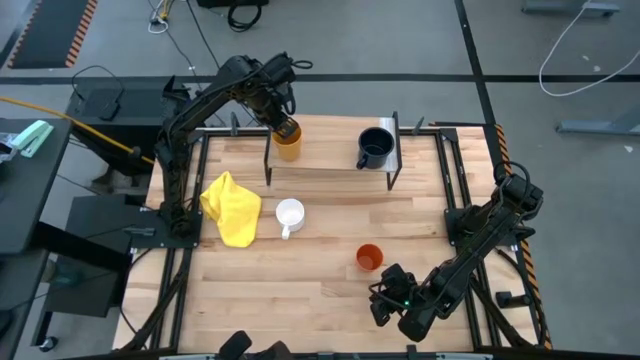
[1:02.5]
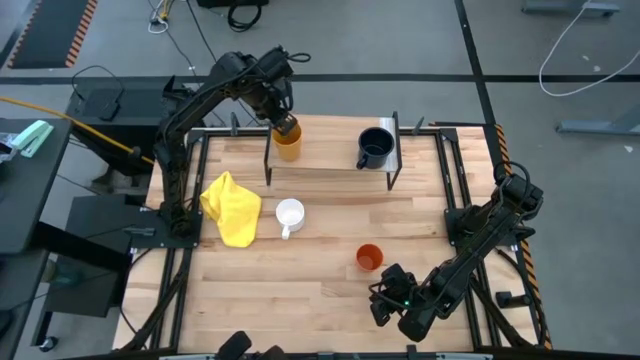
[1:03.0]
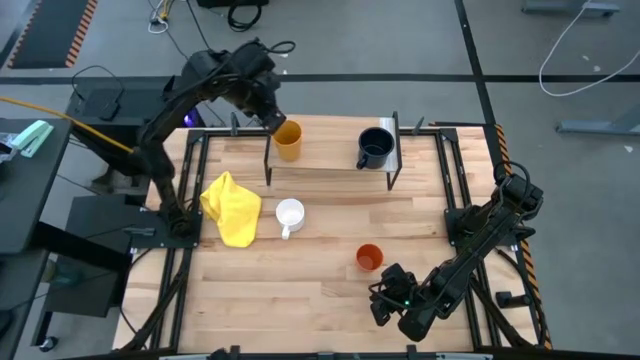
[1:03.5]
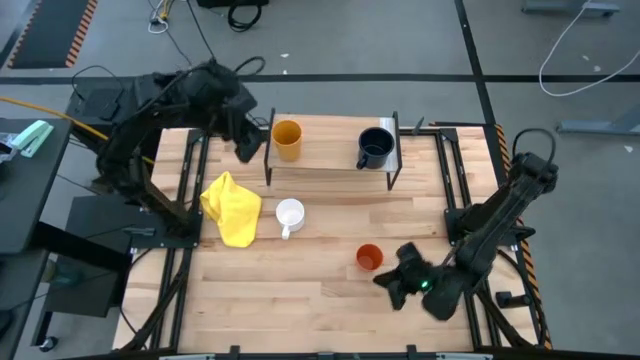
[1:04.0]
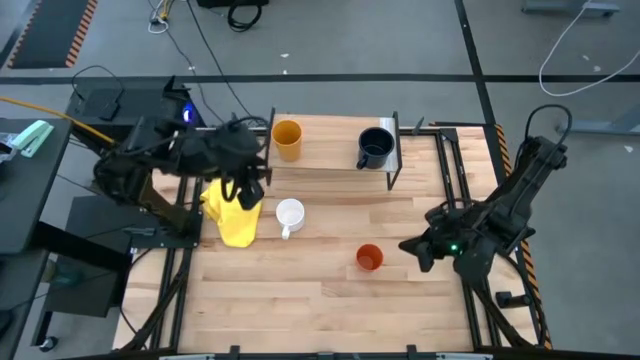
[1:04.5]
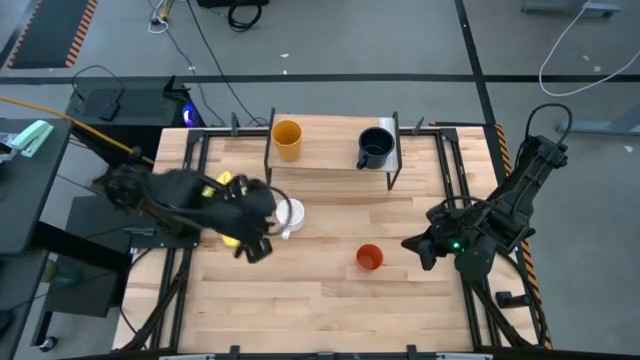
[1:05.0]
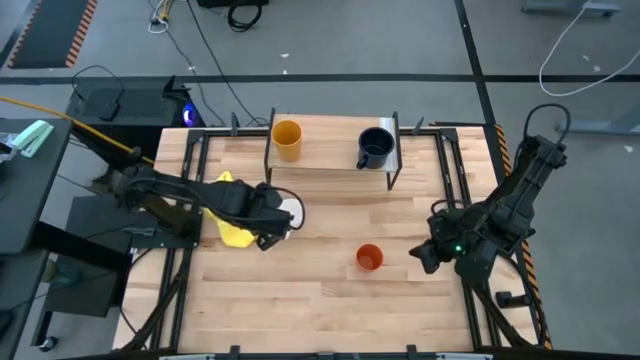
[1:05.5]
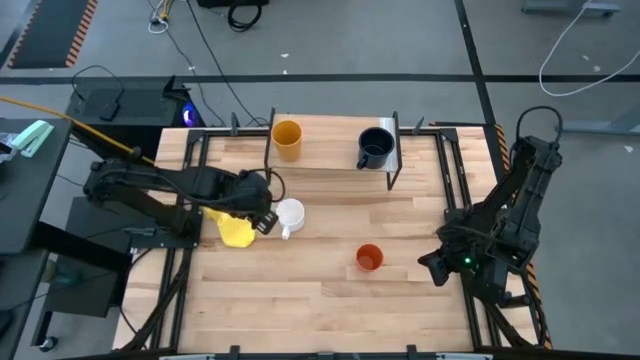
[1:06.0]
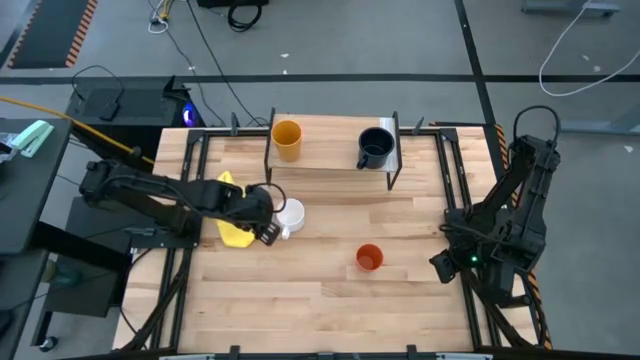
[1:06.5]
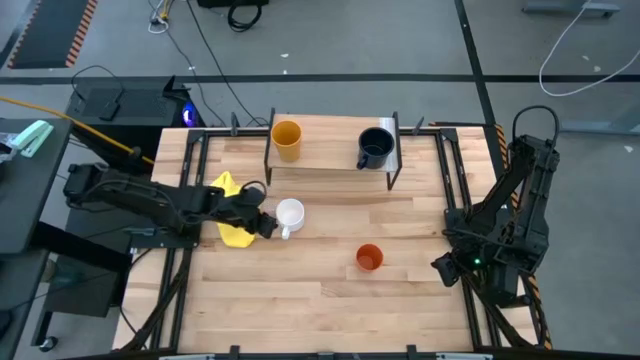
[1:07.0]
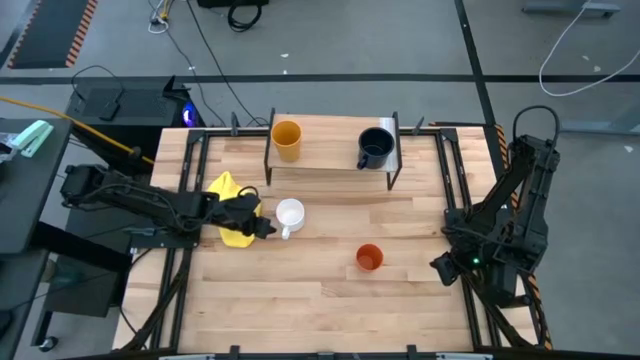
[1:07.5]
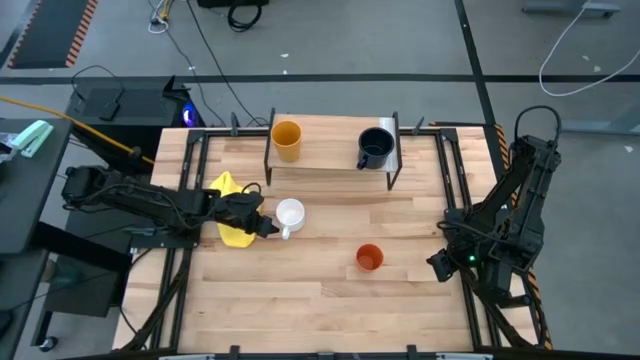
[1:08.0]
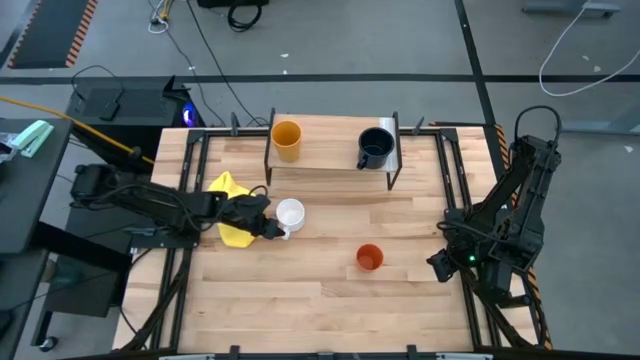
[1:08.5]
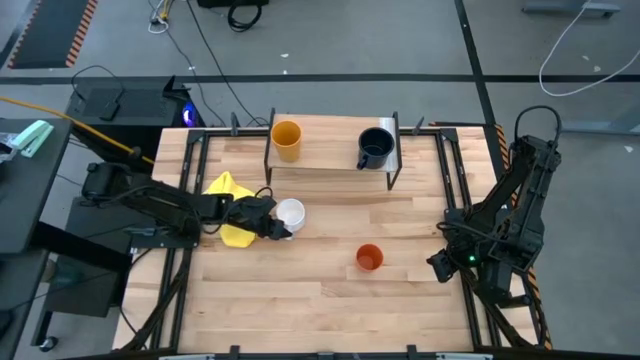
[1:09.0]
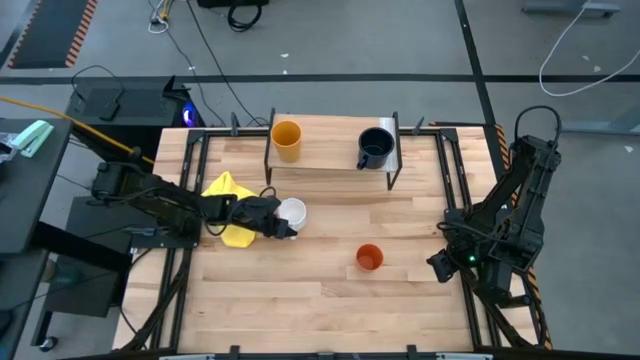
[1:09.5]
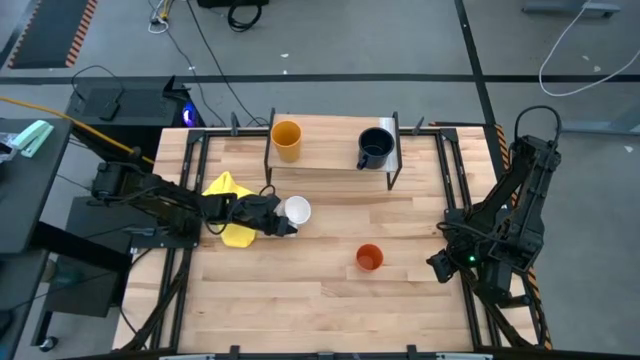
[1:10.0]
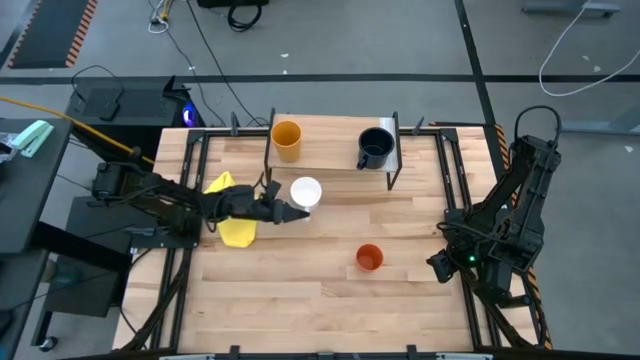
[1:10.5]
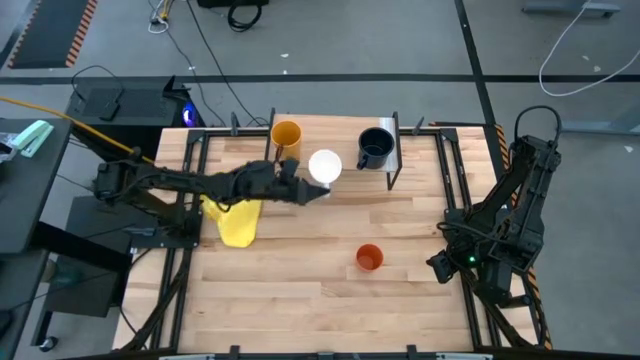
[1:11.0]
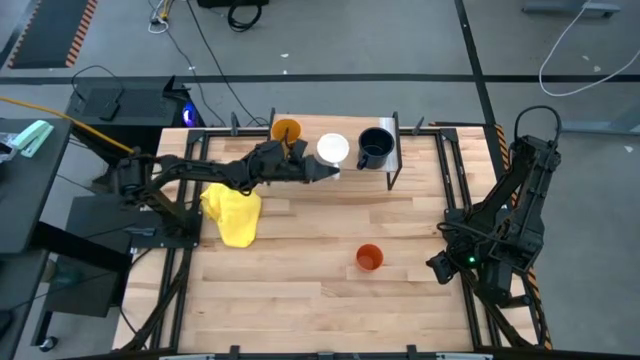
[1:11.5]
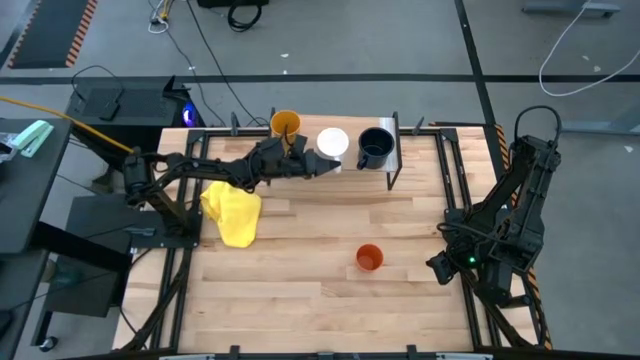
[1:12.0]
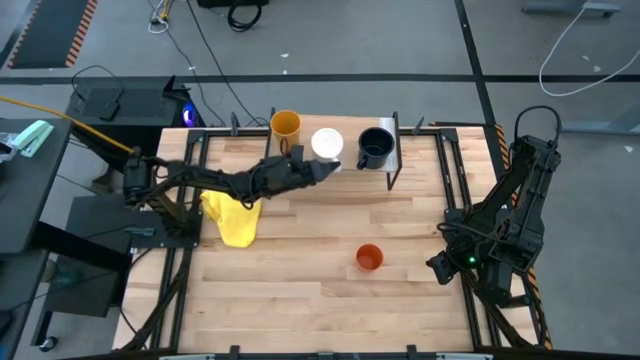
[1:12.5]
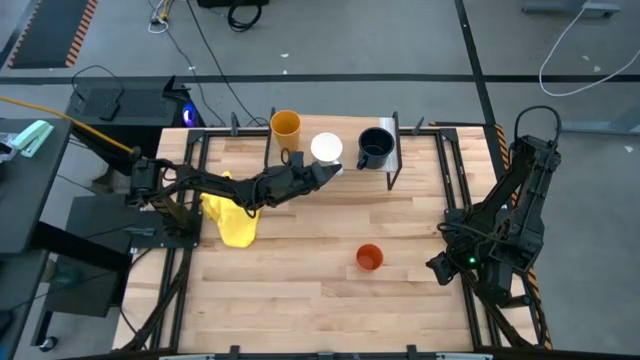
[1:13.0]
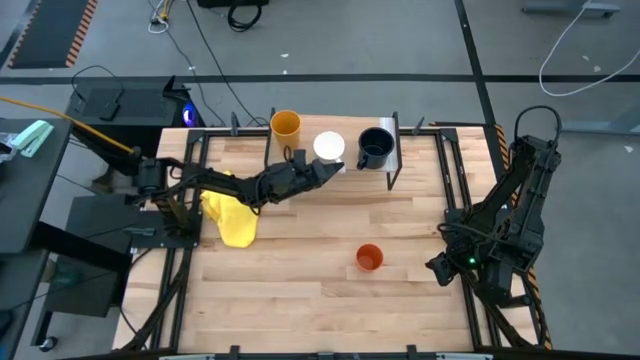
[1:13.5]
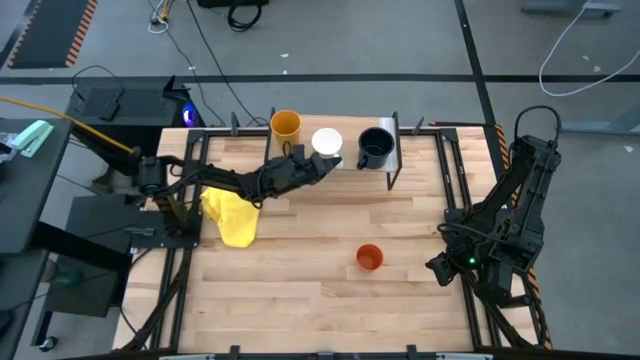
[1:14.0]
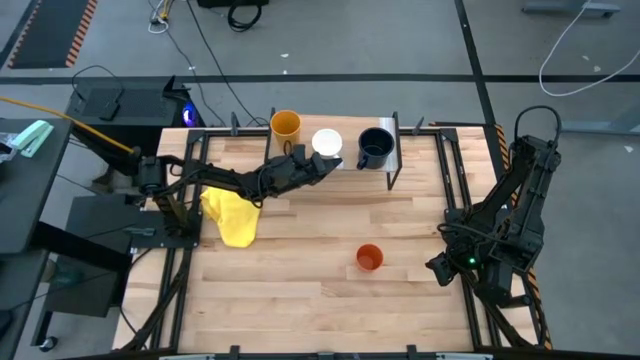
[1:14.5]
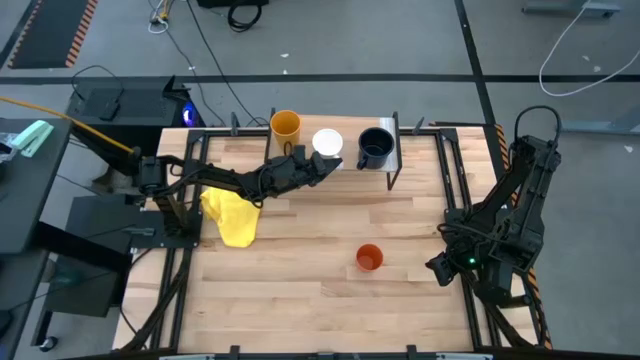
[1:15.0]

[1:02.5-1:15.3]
Task: Stack small to large cups/mugs on shelf
Put the white mug on the shelf

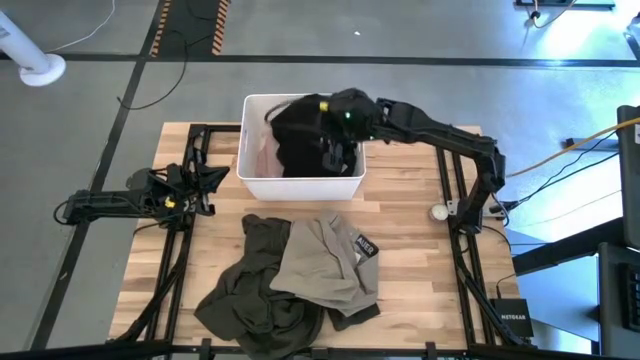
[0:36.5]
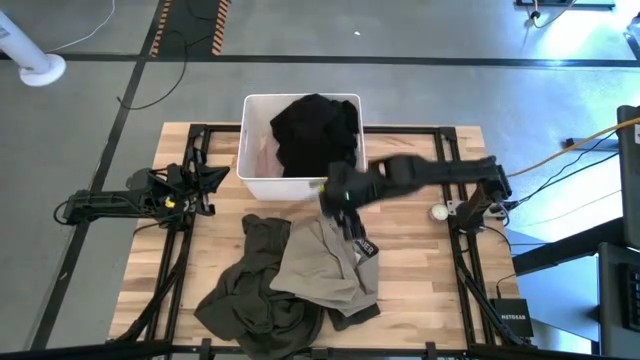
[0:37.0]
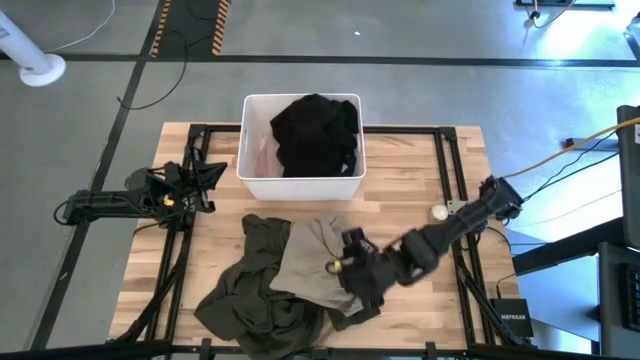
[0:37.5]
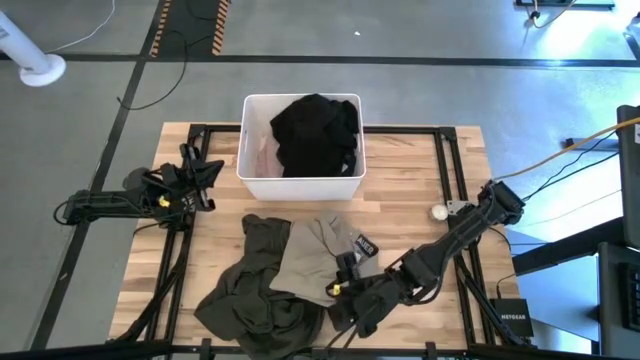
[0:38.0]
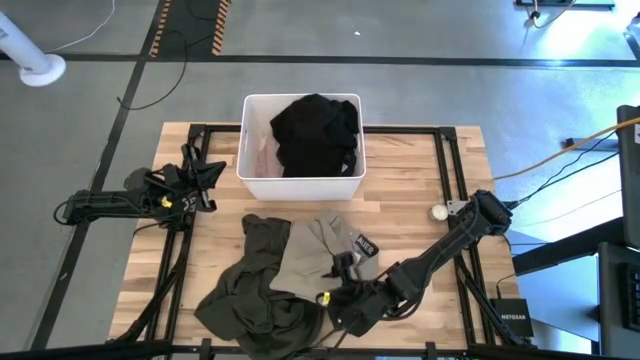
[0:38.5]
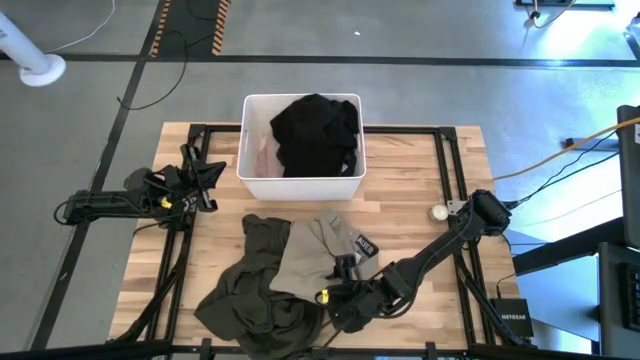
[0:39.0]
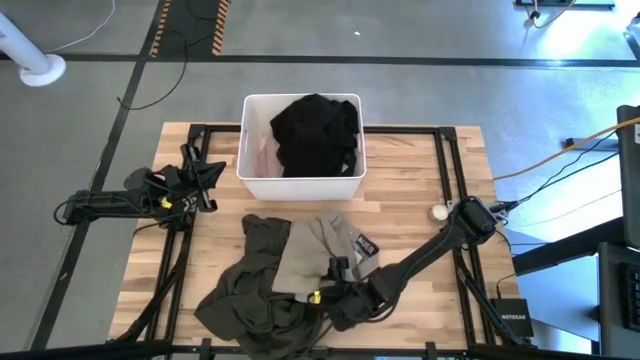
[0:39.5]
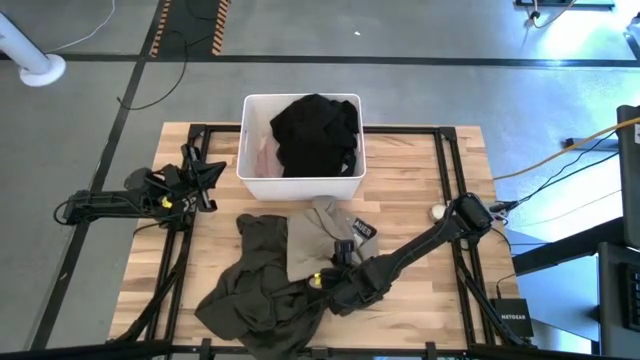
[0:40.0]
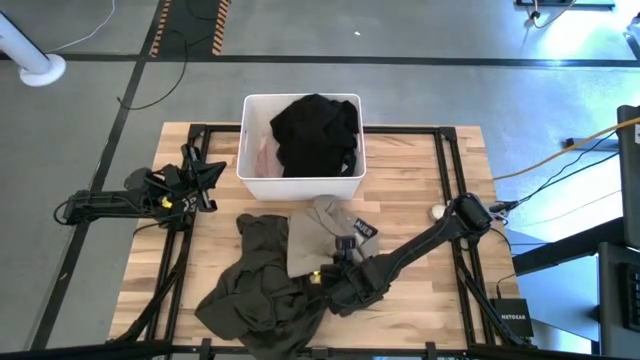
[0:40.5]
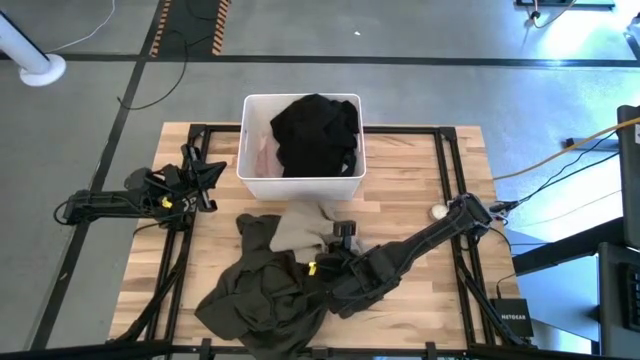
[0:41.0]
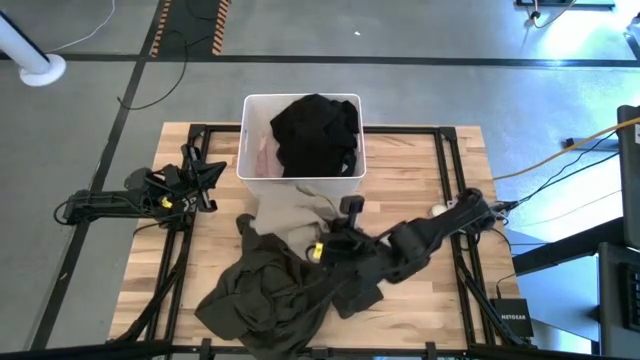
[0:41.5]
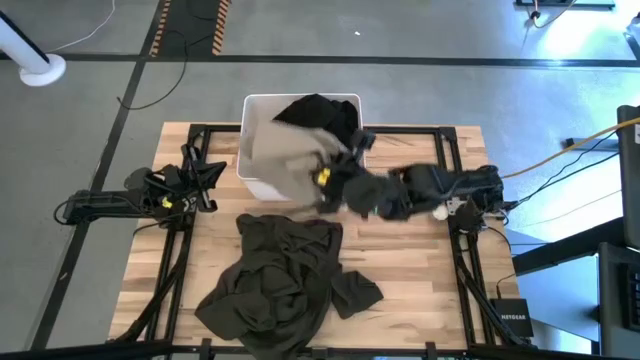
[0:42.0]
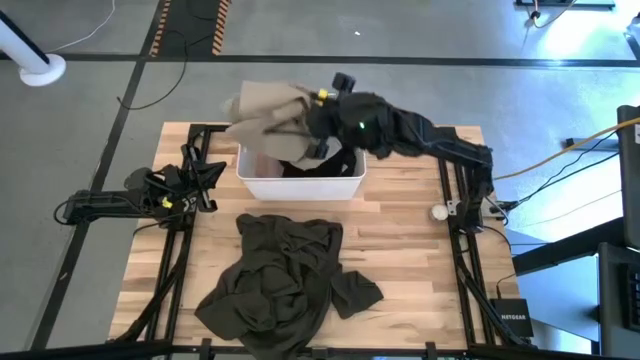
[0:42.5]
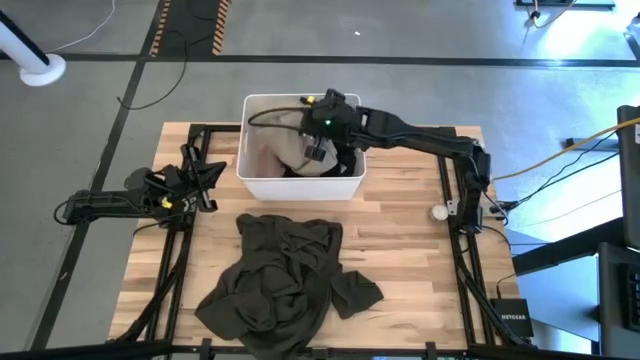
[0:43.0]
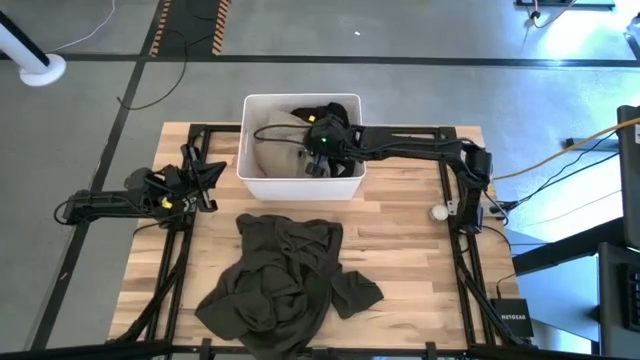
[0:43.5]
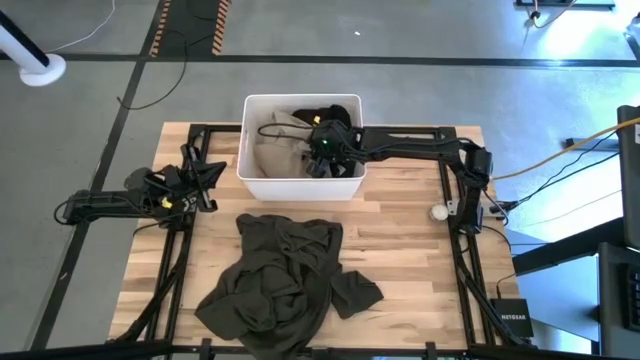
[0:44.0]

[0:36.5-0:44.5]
Task: Sort clothes
Put the brown jacket into the white laundry organizer

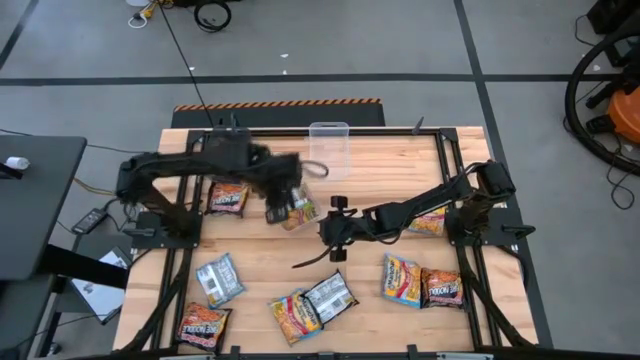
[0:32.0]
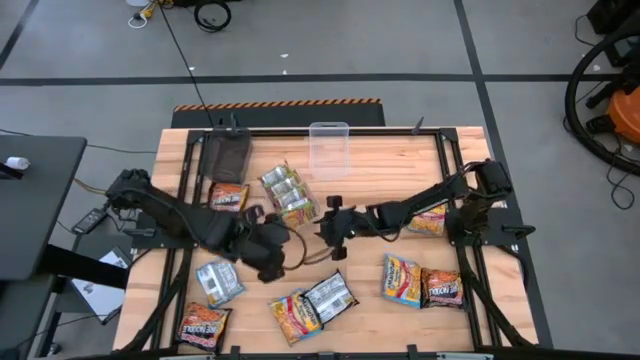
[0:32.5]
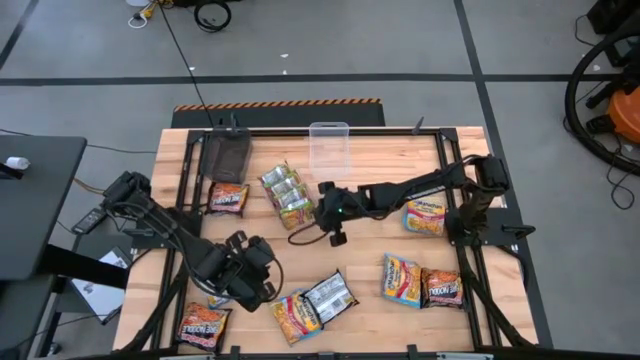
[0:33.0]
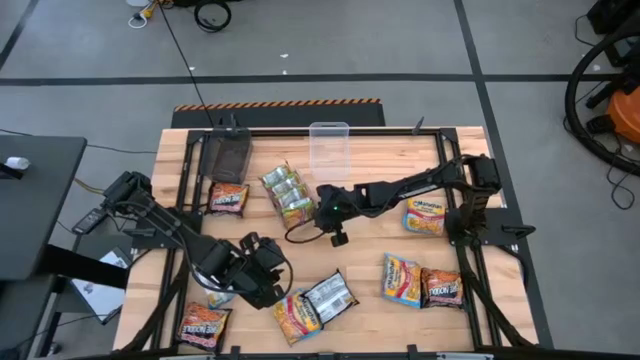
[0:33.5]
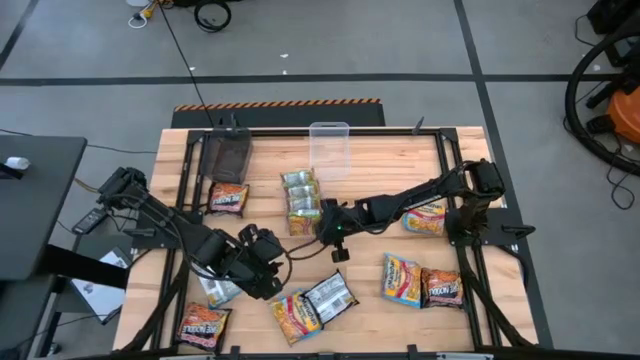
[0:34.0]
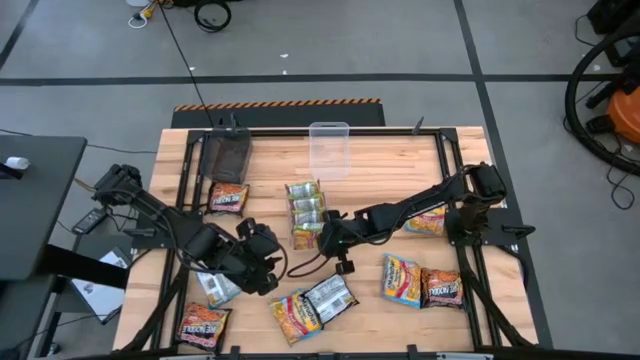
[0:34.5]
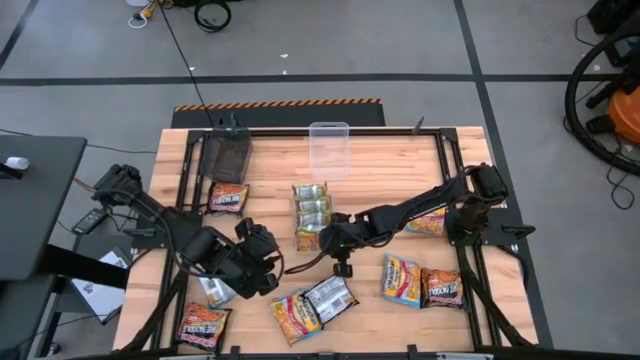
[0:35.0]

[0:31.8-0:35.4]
Task: Sort Maruchan noodles
Adjust the bottom transparent bin
